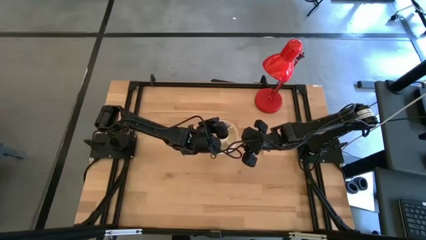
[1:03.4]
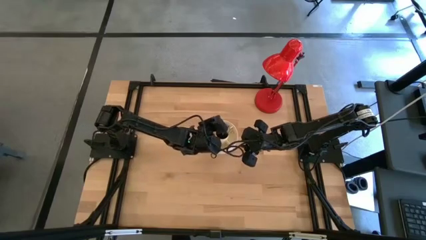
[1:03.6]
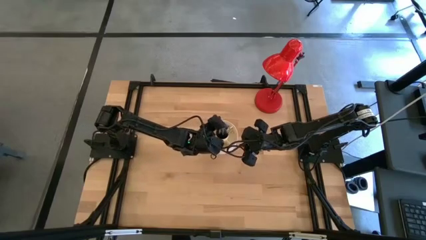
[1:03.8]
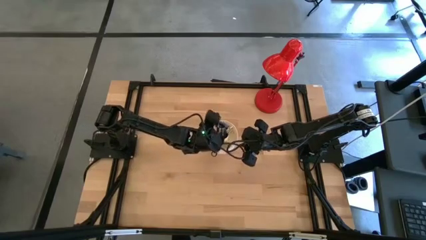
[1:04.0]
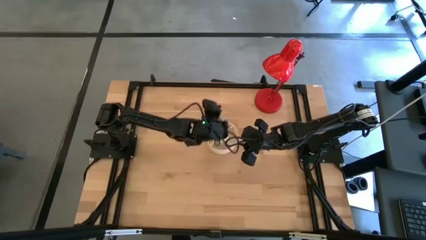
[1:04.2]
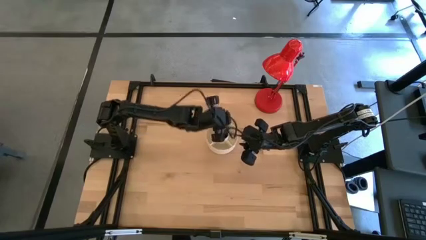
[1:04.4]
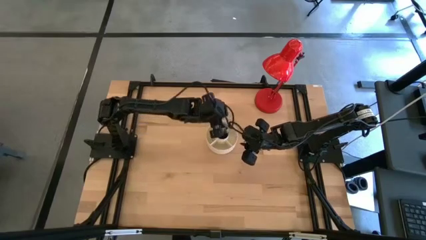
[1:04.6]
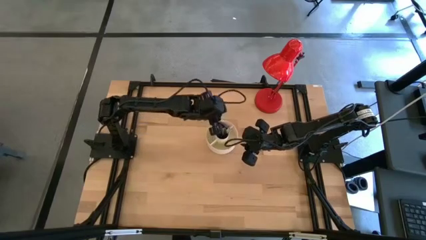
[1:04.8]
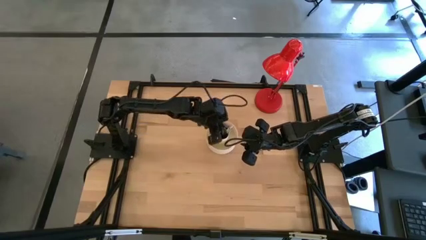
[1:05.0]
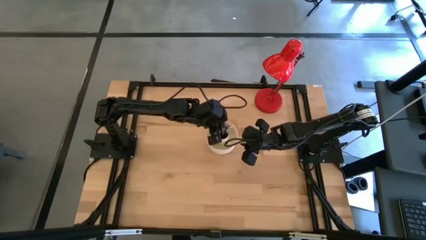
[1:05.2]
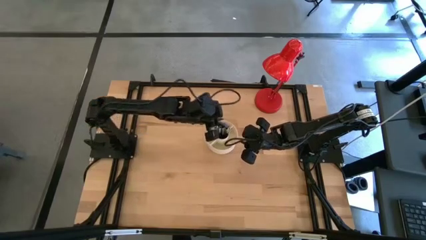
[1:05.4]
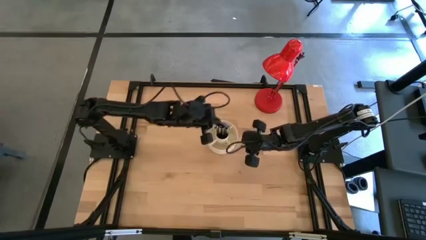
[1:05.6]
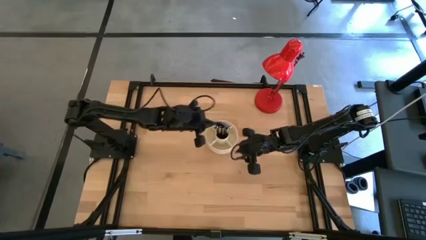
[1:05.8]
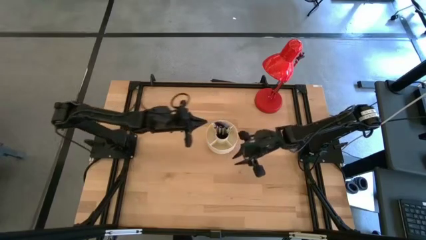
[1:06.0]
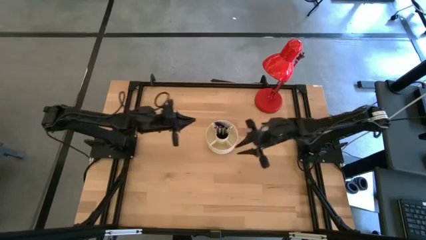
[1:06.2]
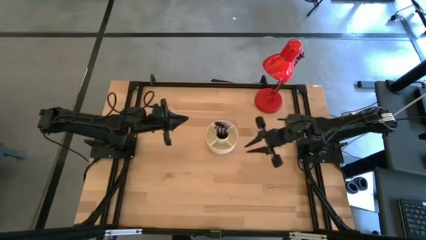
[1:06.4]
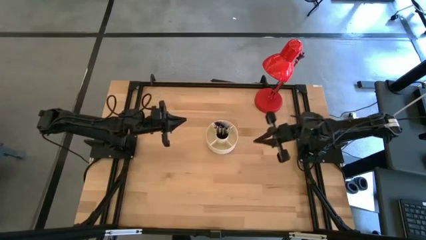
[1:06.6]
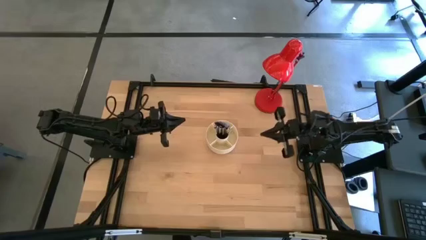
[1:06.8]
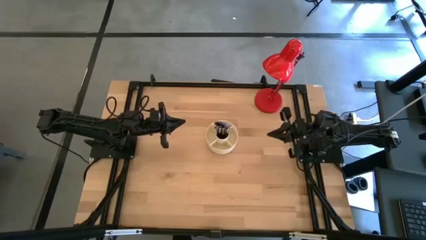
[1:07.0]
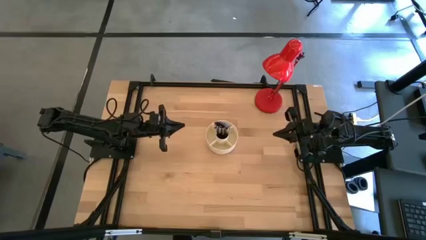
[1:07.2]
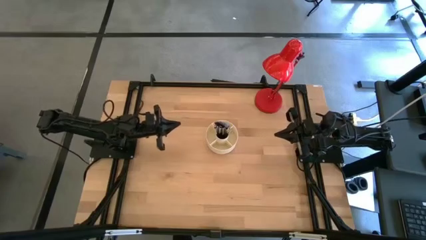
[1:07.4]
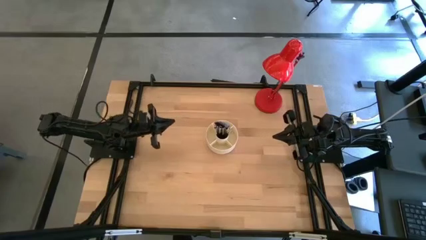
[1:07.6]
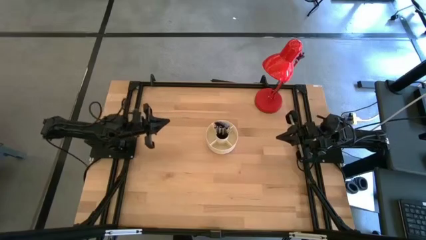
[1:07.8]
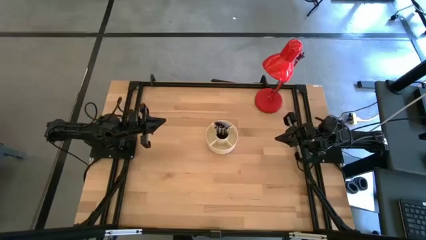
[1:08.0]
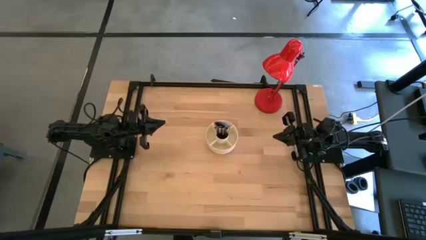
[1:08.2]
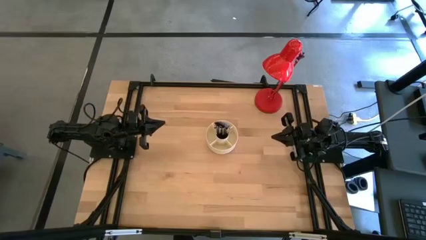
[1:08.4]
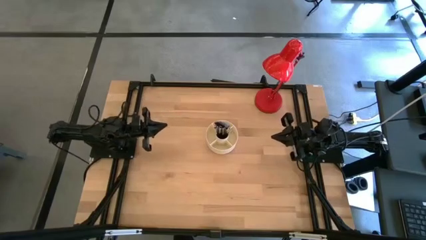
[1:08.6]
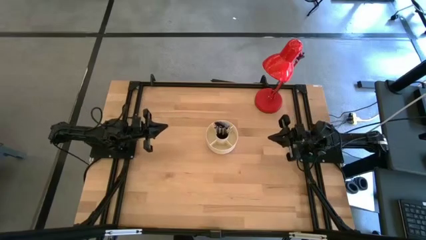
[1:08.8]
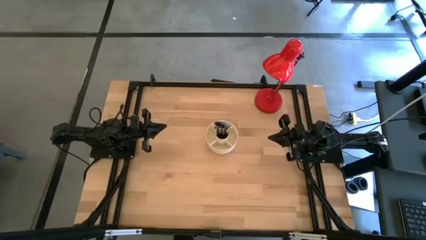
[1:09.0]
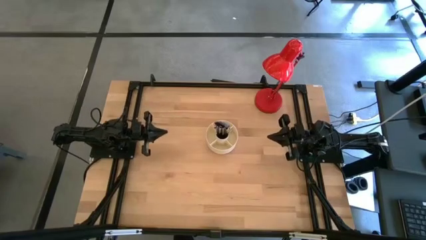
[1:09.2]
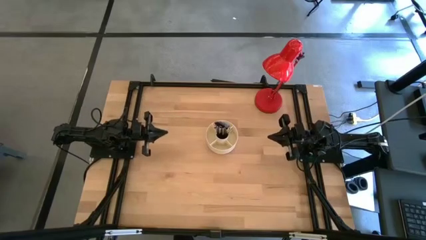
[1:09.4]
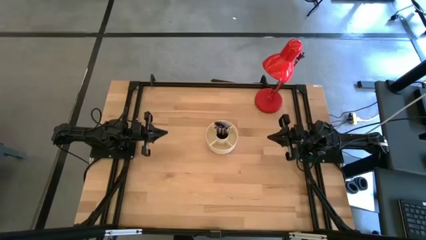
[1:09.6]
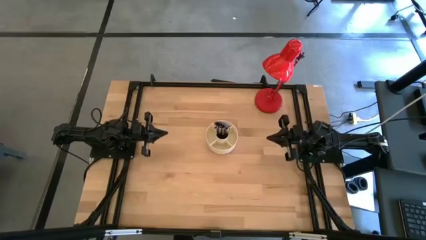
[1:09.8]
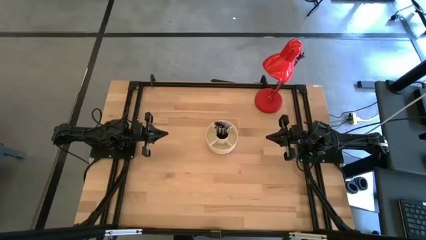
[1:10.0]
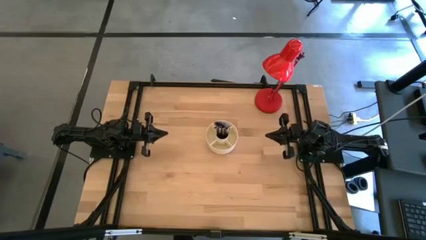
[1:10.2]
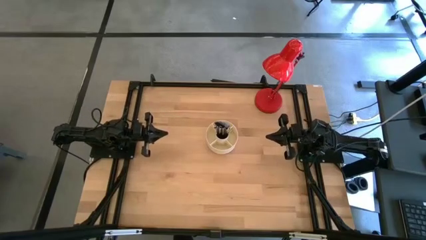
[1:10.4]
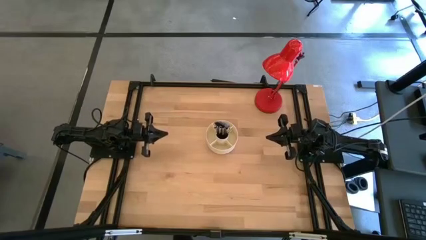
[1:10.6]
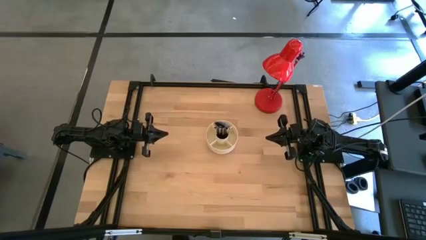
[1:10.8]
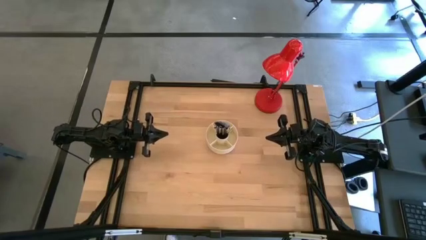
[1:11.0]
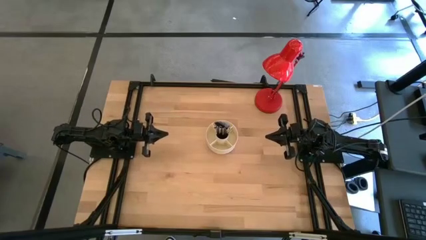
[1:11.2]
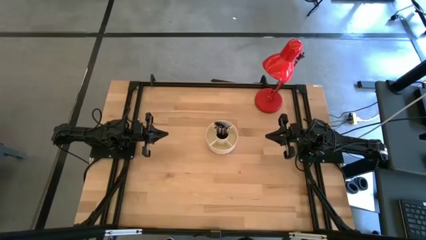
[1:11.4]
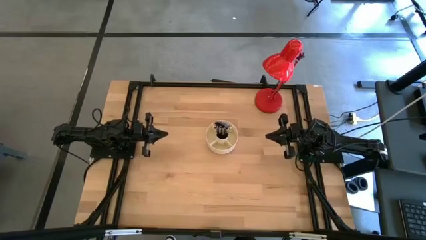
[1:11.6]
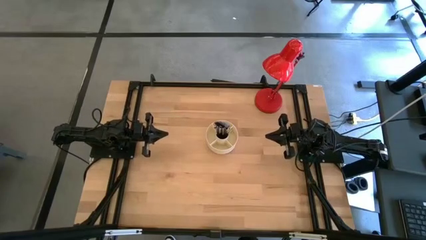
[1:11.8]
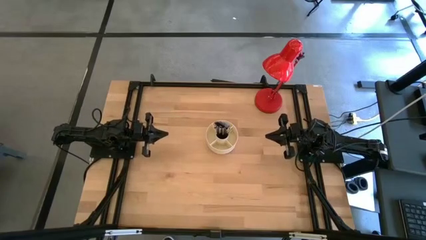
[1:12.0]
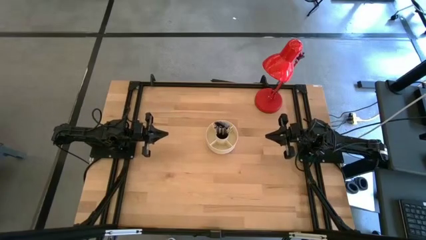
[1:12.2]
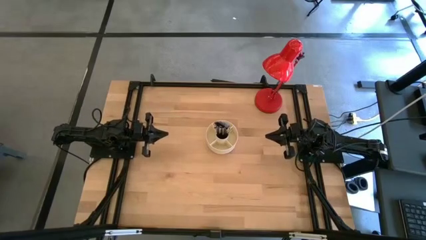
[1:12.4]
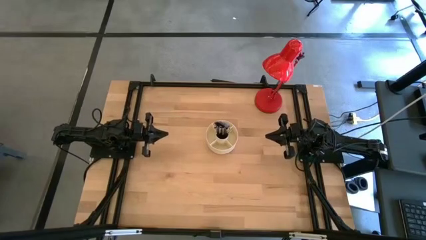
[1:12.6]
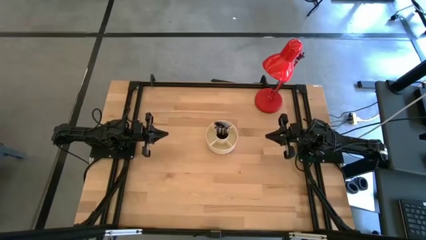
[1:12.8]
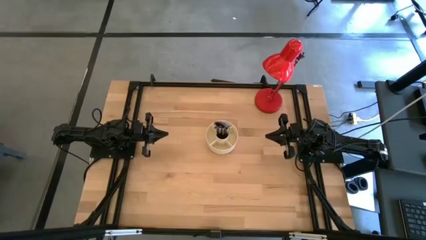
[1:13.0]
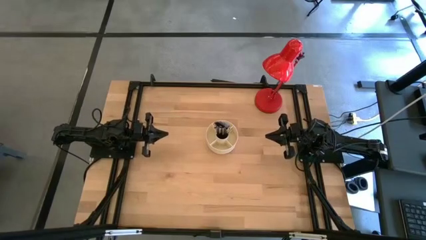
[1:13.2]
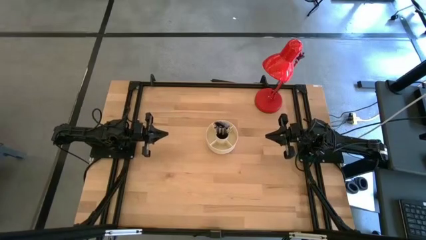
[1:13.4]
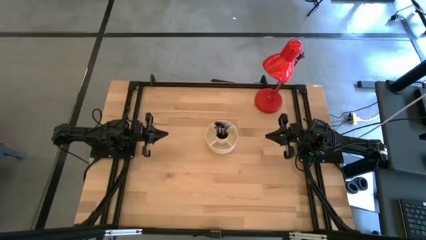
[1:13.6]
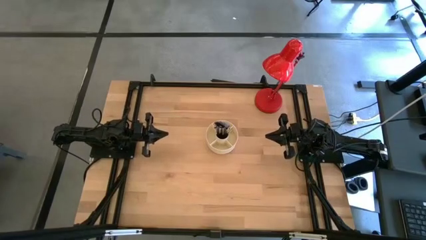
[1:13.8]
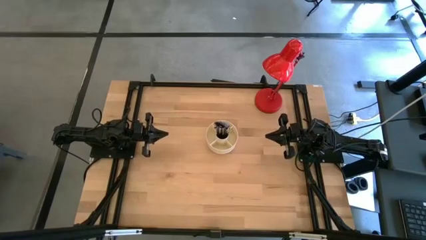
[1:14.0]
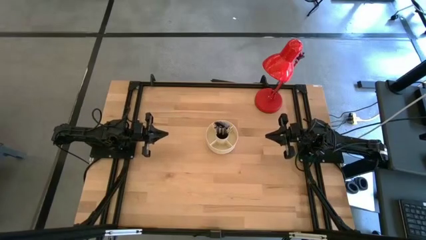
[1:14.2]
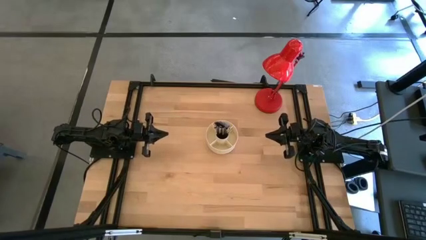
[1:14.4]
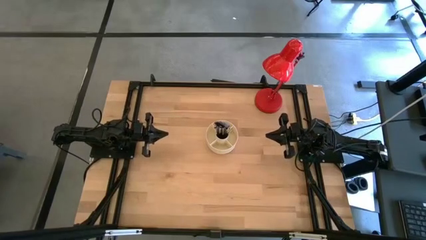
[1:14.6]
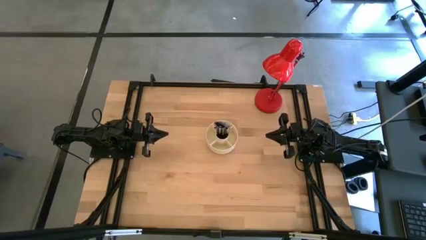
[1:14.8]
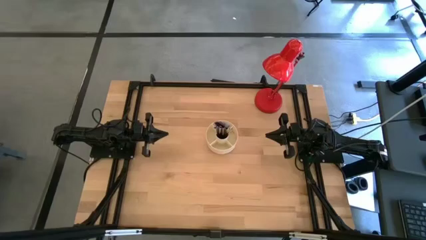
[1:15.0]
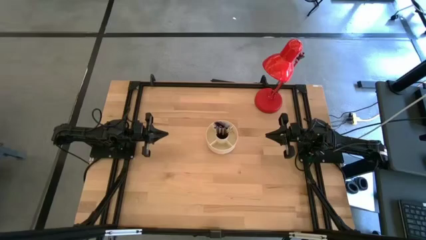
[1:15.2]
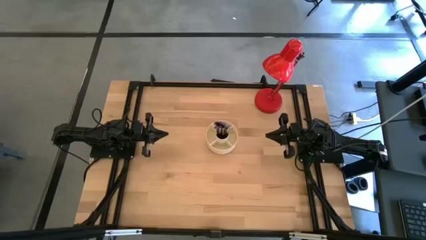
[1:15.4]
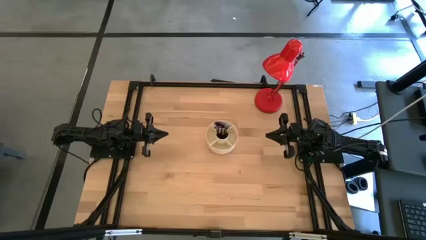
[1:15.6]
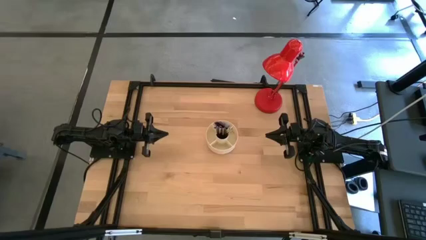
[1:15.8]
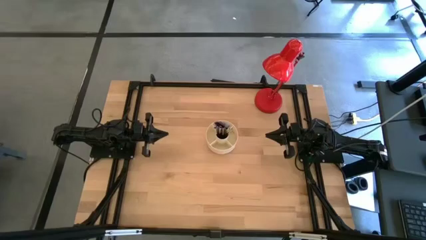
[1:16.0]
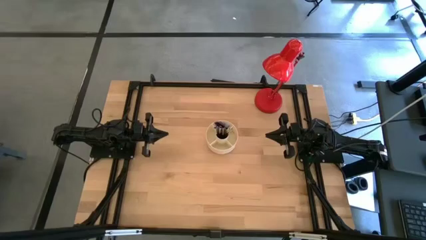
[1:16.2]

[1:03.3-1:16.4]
Task: Put items in baskets/containers
Return to Home Position

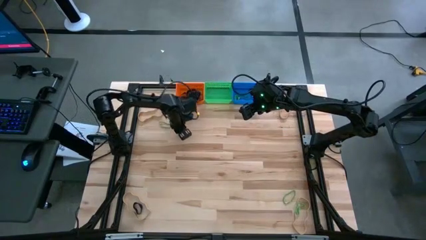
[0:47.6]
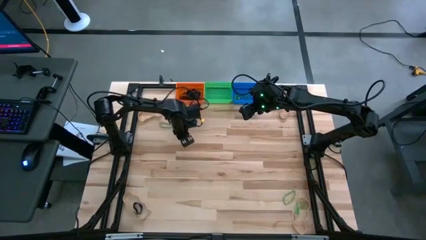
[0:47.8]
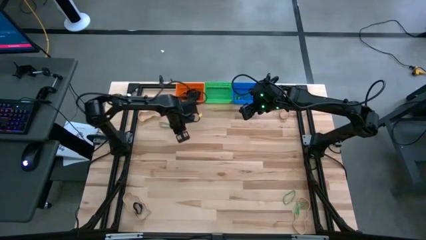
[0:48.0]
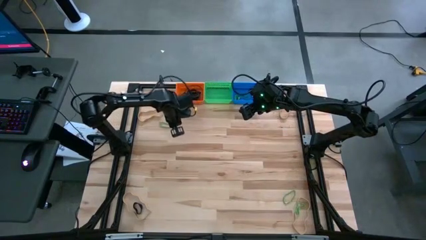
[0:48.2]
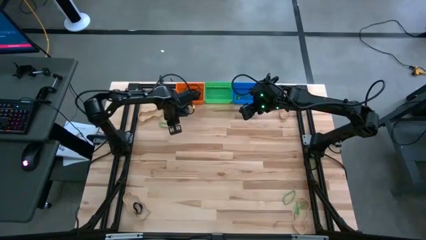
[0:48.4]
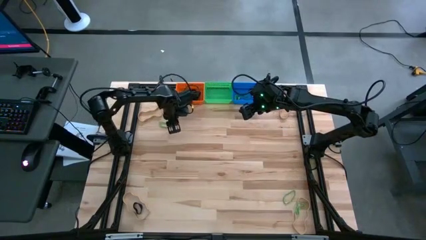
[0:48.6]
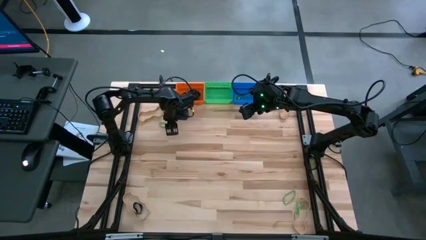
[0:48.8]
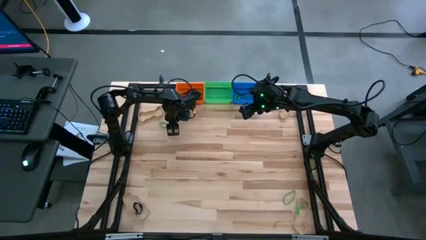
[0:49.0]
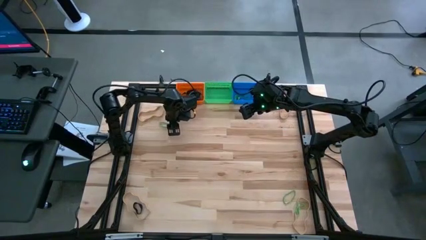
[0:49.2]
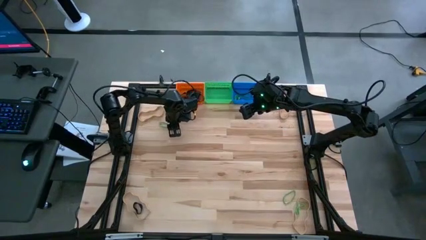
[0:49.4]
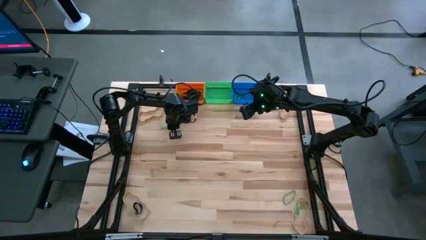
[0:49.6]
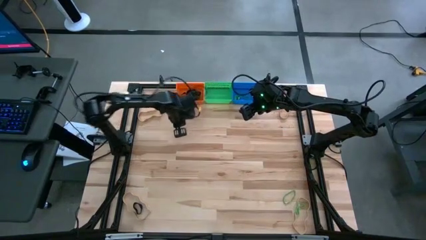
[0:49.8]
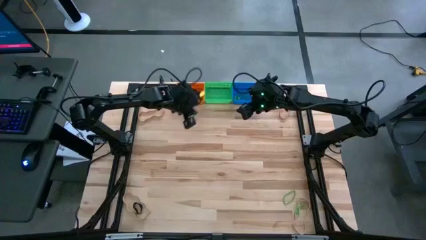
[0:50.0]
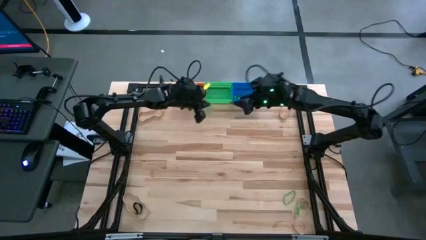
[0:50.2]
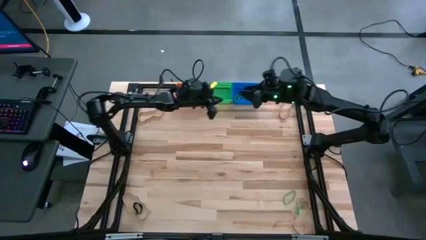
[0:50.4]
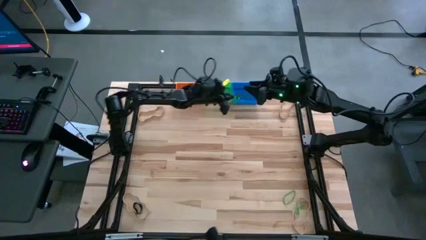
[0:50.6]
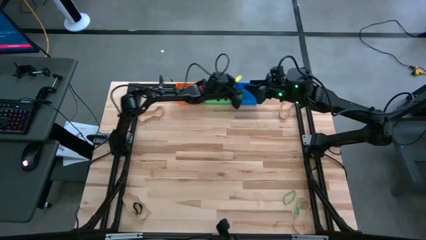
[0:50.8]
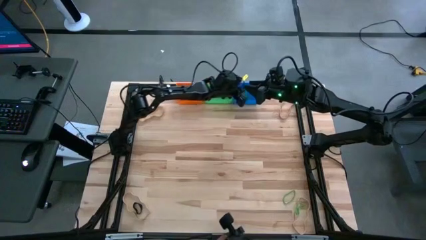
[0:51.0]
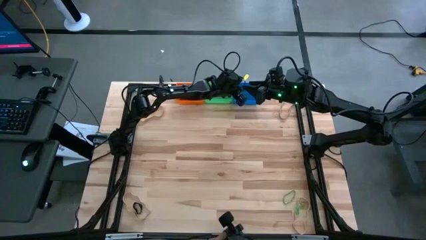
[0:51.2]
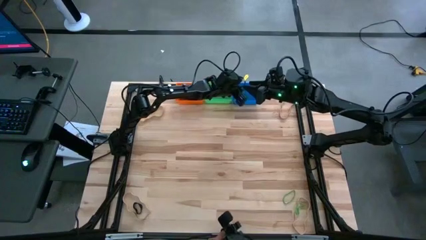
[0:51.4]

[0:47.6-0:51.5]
Task: Sort rubber bands into baskets
Put the green rubber band into the blue basket
